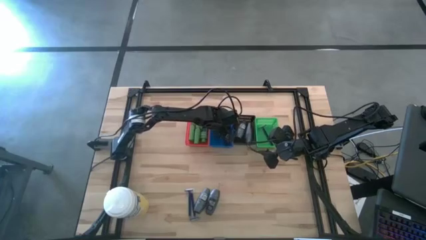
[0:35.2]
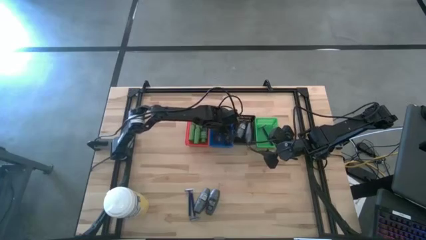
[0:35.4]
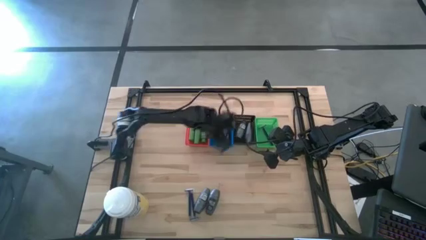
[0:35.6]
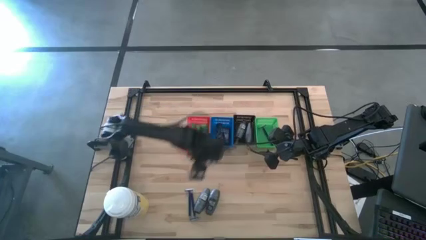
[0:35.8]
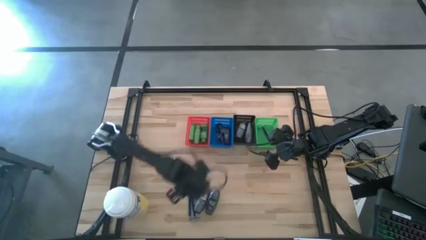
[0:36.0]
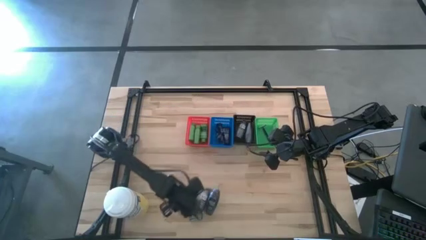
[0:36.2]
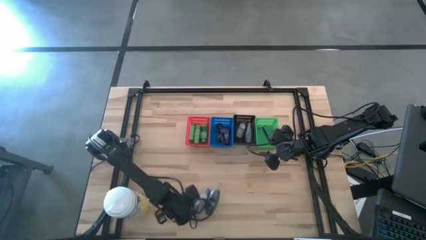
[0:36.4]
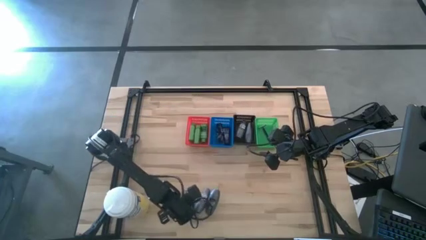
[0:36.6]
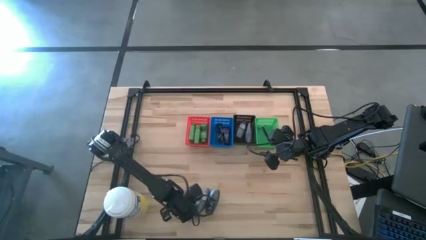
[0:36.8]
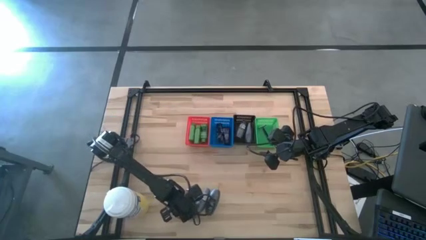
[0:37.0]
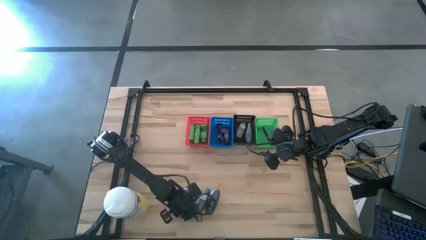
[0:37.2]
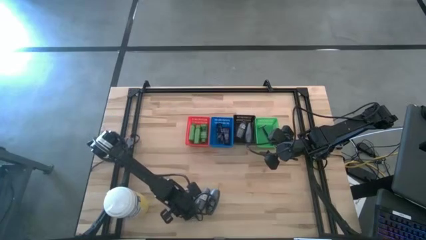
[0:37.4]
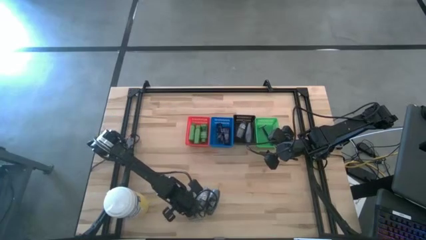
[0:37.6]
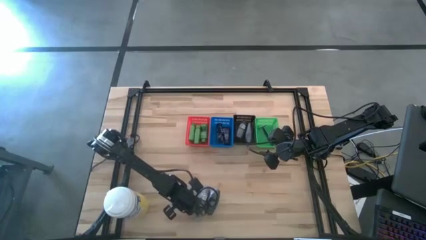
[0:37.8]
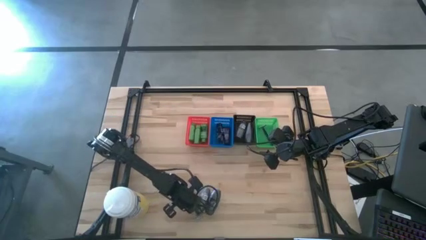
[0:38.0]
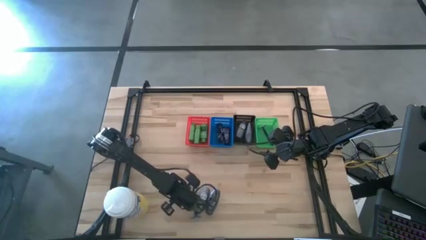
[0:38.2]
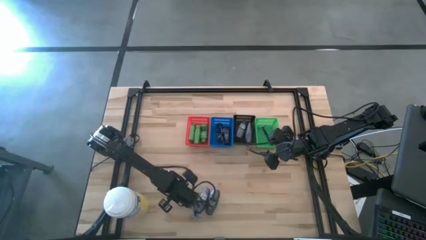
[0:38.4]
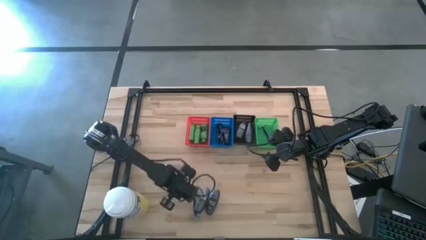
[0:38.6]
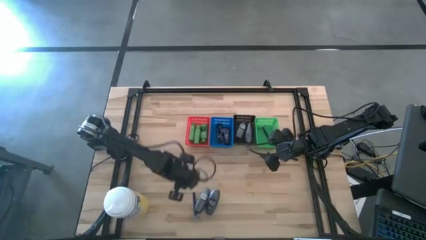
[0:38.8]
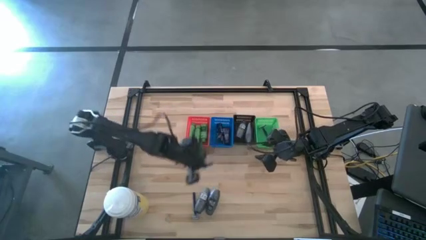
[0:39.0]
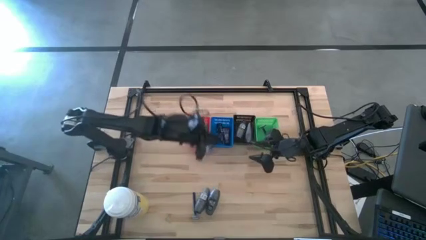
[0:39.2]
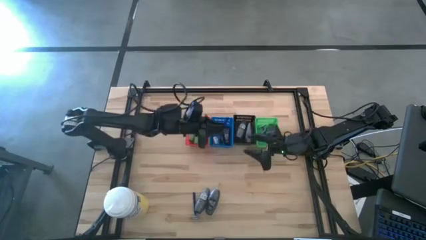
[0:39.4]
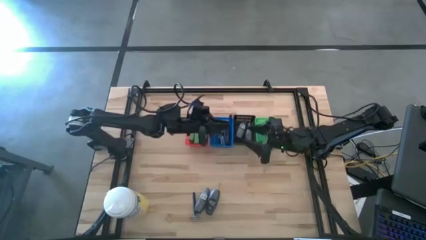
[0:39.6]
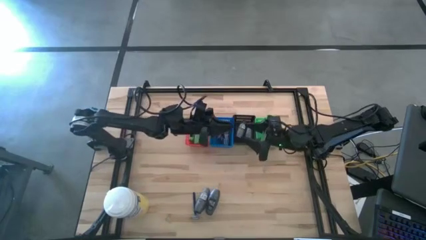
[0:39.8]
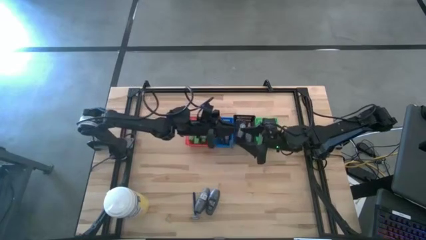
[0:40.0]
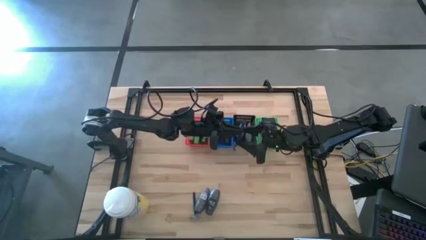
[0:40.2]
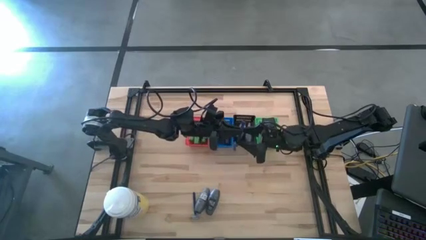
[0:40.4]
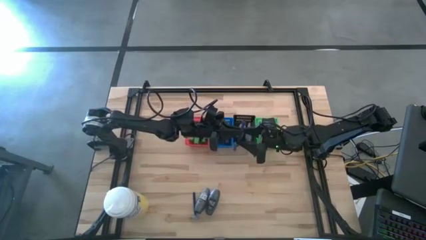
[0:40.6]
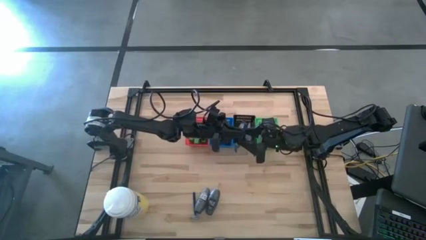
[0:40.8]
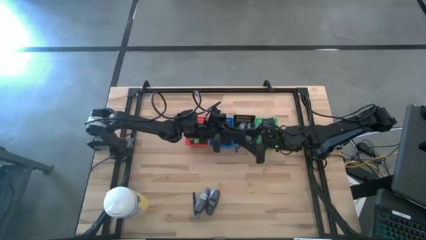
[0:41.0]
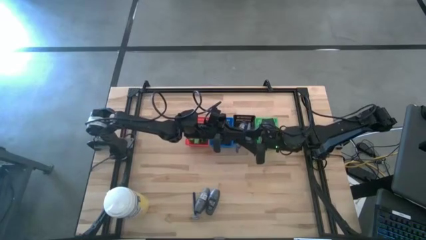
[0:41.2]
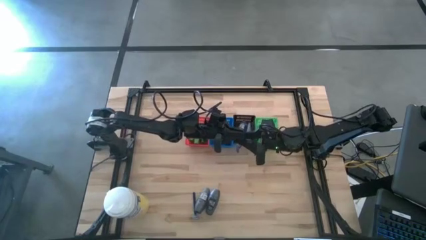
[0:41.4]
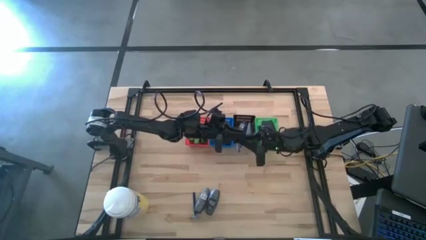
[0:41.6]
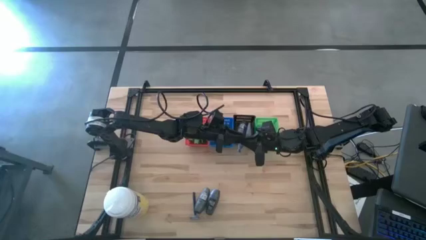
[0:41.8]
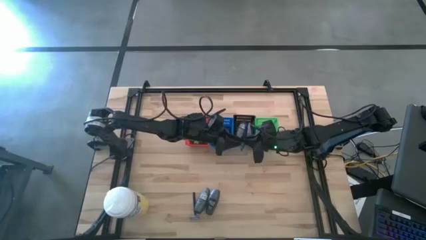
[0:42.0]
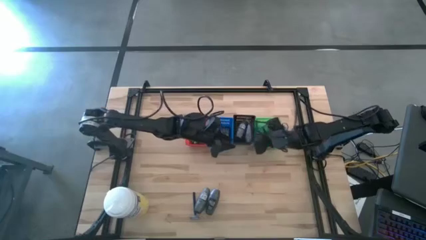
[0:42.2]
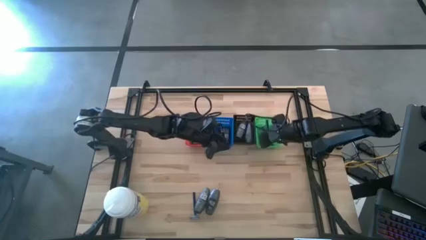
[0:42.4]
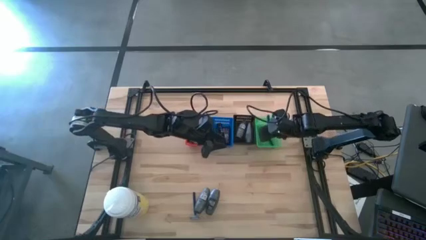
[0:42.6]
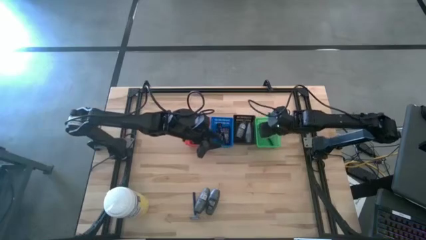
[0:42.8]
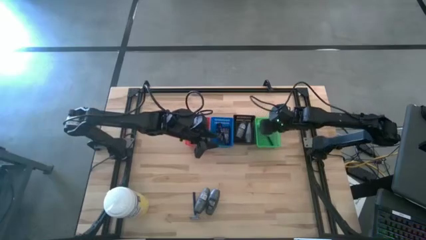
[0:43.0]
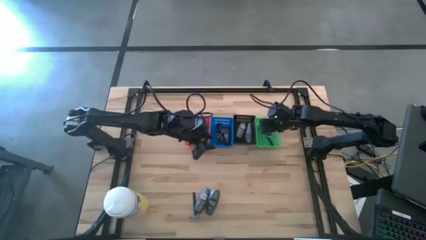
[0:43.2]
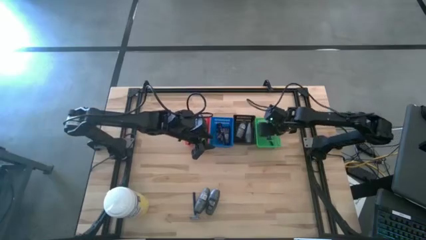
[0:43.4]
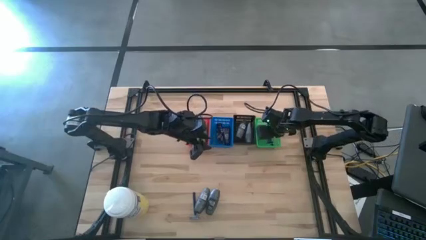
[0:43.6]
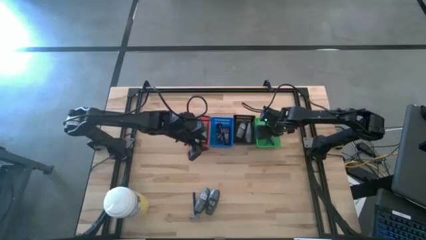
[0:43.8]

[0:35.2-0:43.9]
Task: Pick & Place Travel size toiletries
Put the blue razor into the green bin

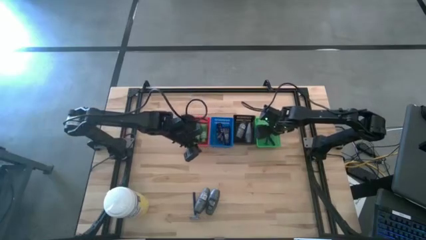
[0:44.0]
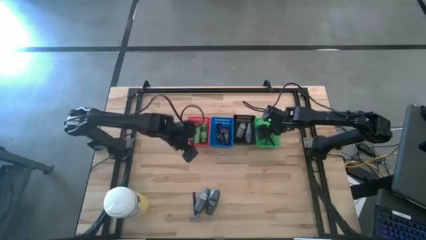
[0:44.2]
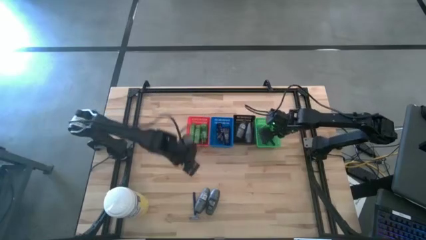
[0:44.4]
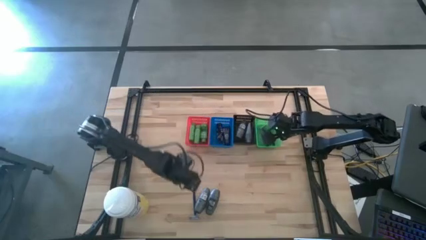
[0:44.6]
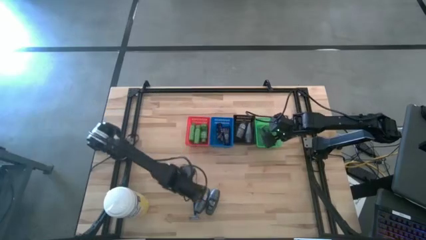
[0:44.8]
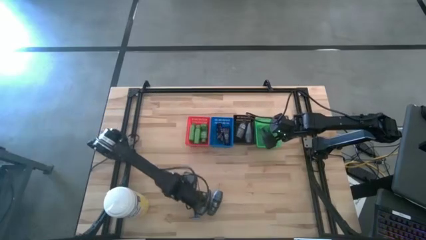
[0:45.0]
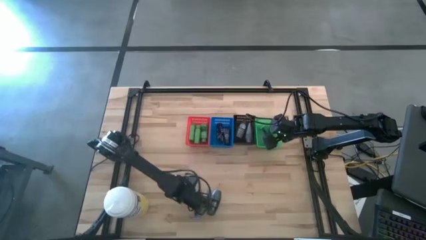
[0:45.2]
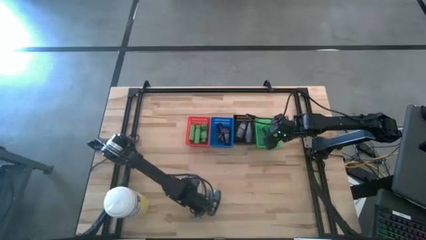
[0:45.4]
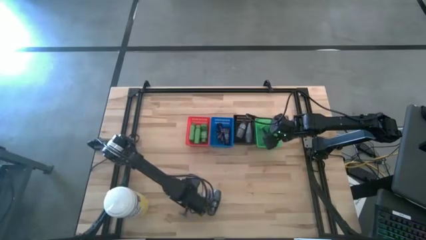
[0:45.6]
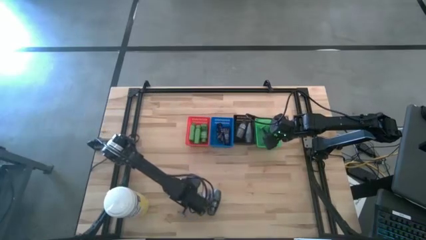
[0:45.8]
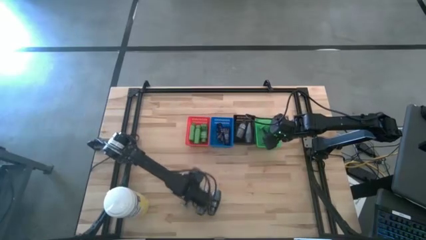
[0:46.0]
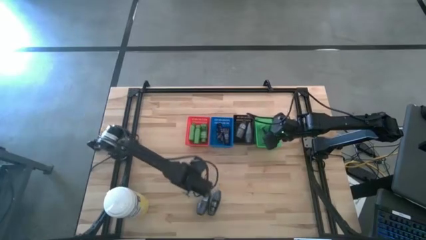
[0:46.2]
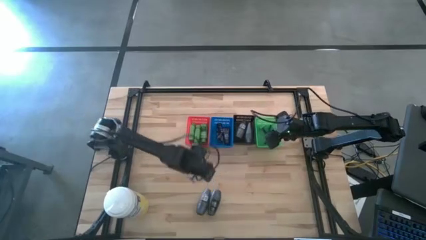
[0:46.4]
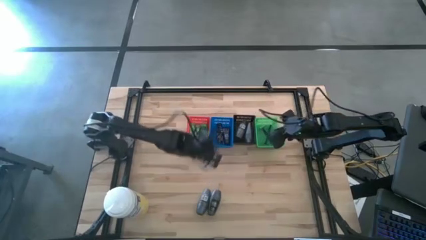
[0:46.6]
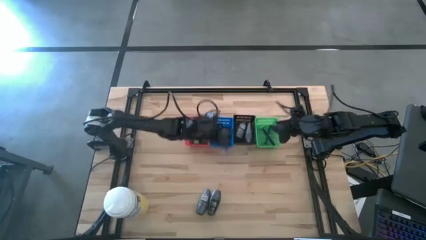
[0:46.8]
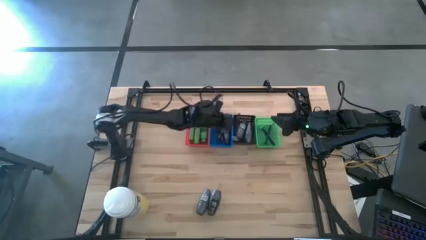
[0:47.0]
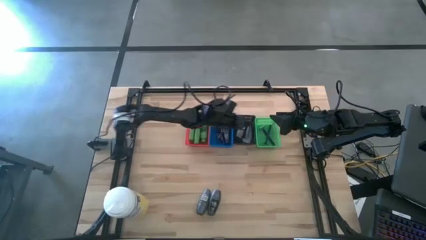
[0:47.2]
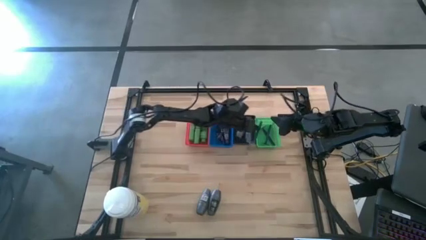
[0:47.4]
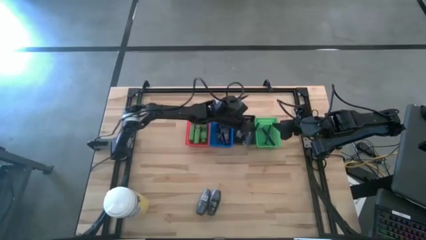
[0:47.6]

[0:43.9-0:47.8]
Put the blue razor into the green bin

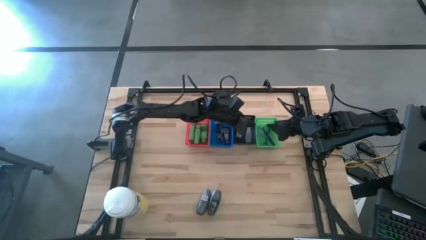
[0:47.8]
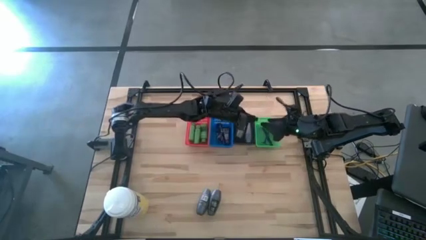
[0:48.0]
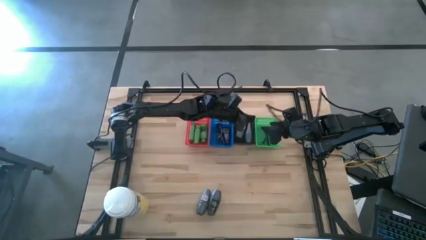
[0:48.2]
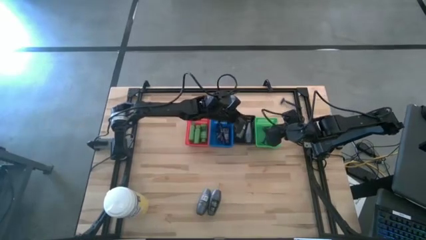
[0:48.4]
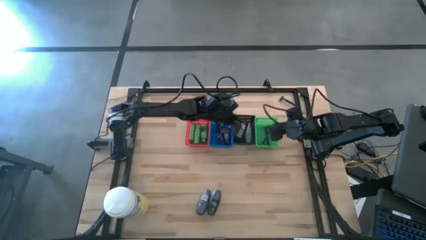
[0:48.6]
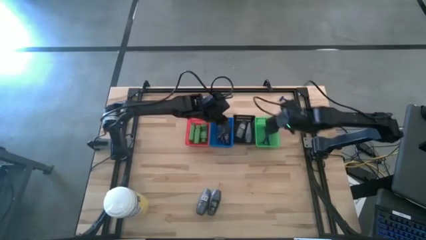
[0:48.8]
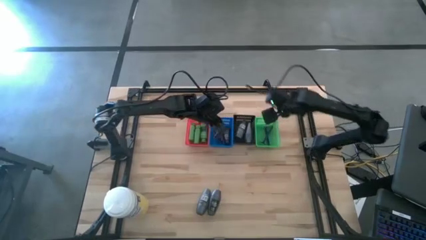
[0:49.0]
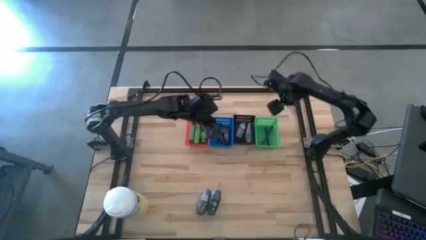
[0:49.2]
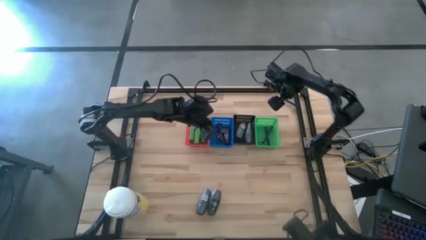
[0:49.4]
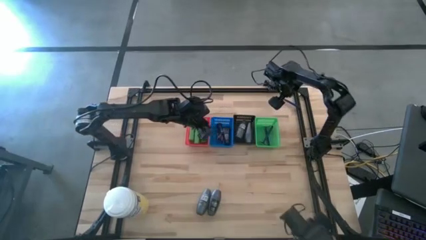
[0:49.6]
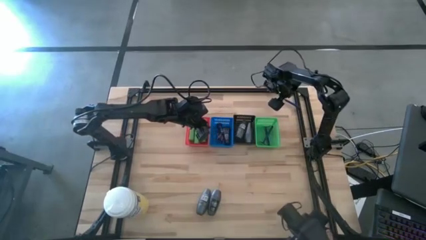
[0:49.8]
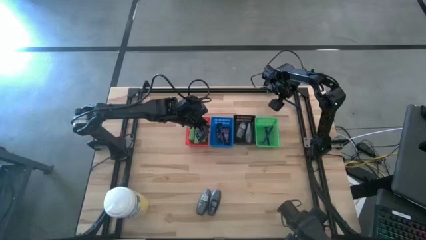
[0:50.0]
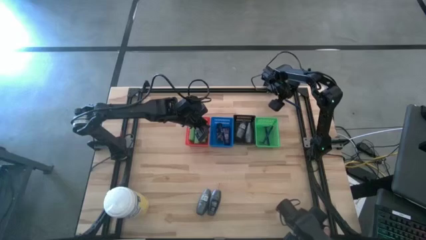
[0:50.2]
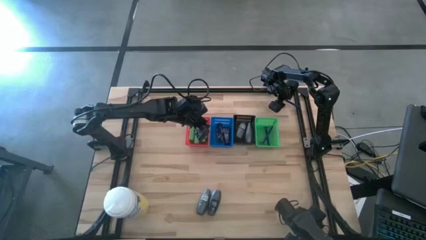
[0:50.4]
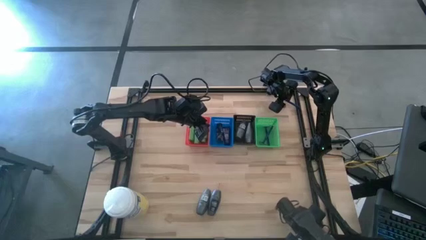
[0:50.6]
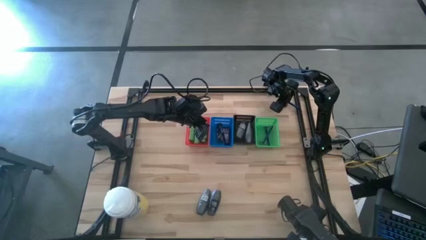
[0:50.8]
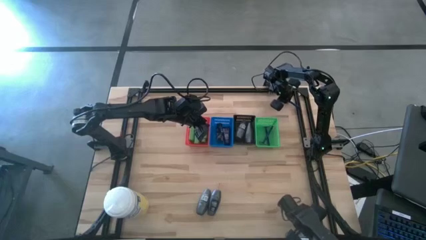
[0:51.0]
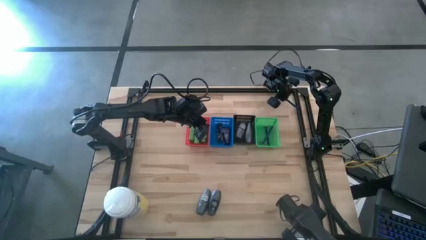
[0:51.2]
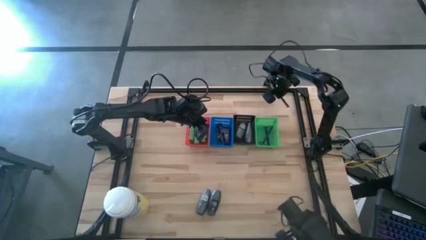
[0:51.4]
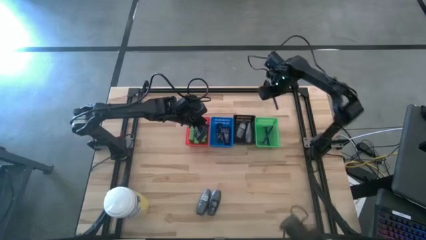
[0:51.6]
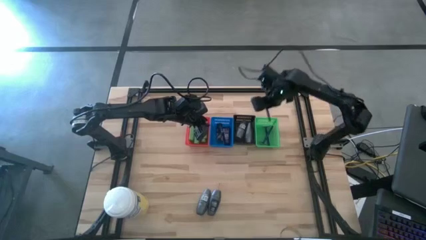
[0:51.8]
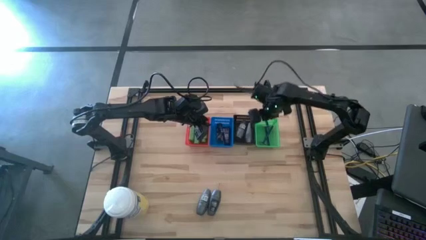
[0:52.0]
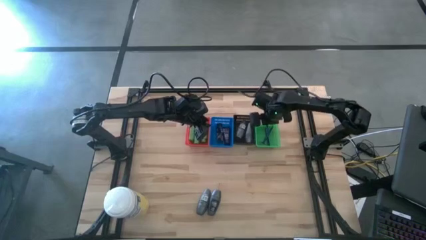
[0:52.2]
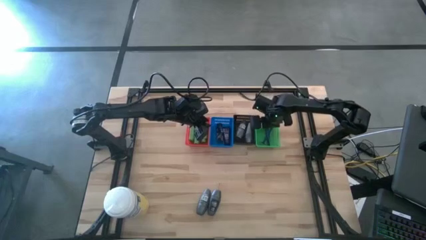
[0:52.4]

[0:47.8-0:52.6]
Put the blue razor into the green bin
